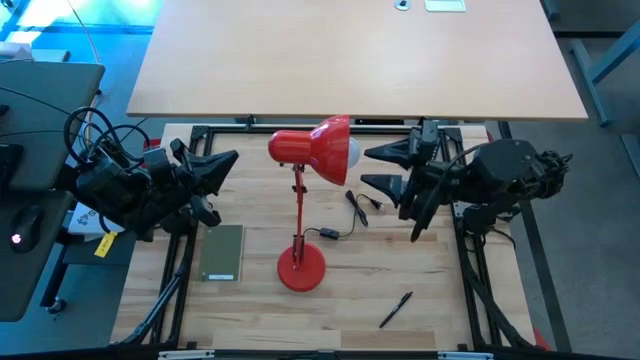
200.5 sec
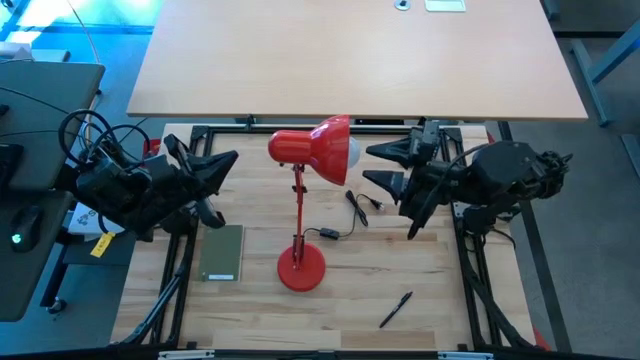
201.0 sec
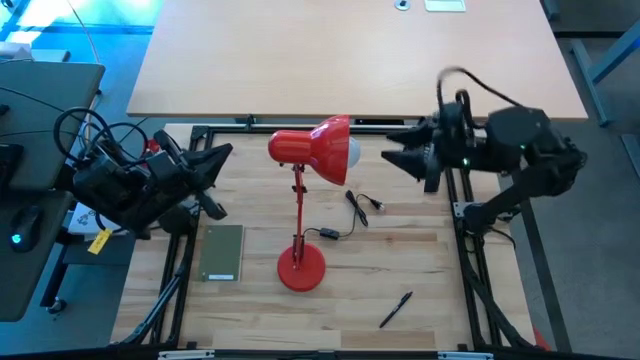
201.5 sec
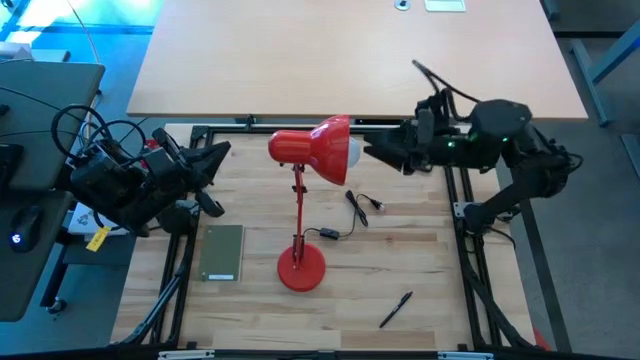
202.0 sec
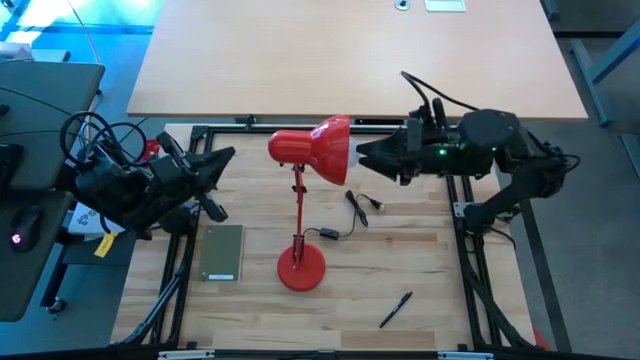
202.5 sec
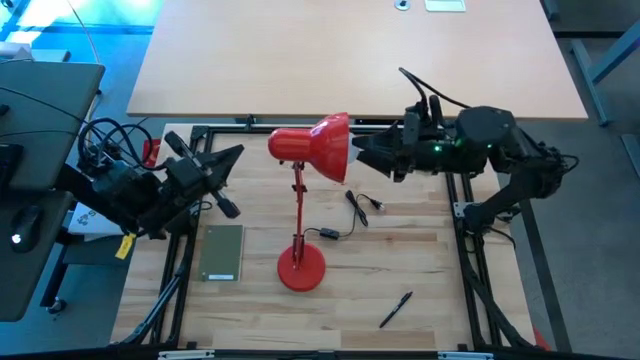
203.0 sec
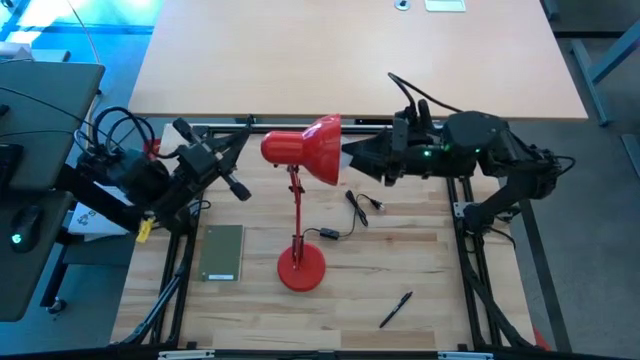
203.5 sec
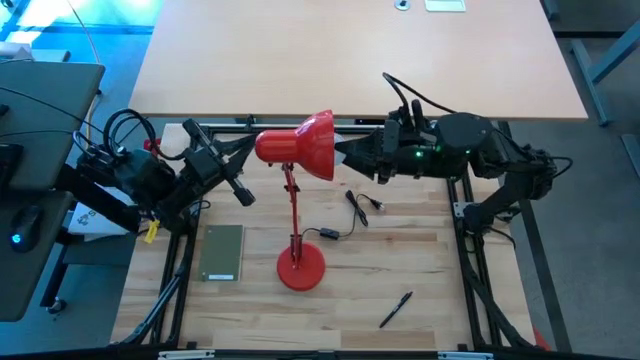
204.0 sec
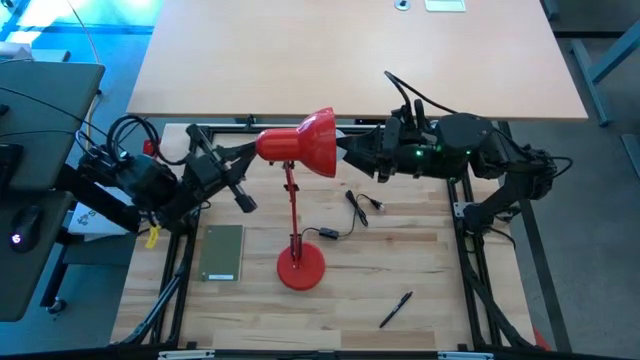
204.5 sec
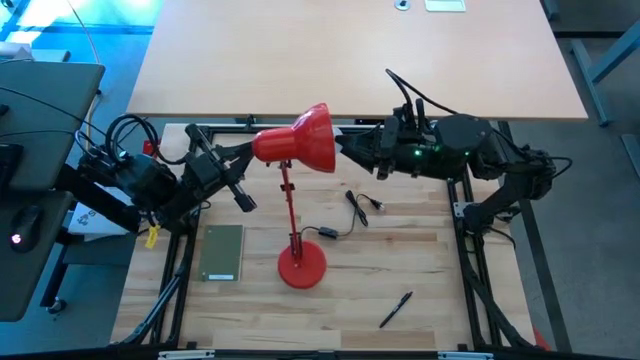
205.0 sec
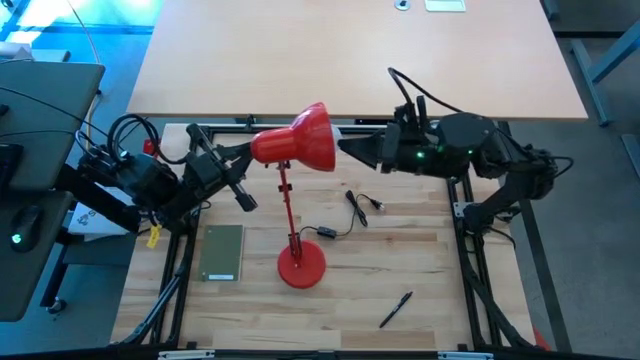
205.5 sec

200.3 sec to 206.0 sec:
Task: Screw lightbulb
Insert the white lightbulb into the red lamp

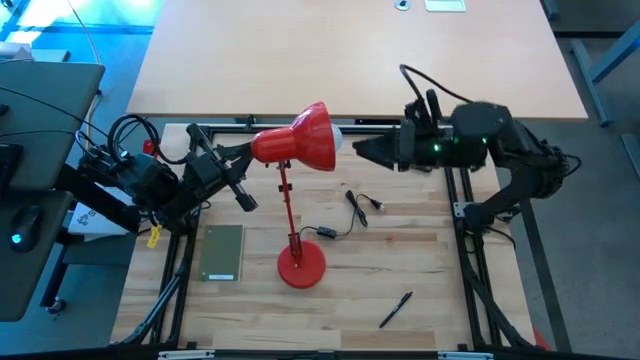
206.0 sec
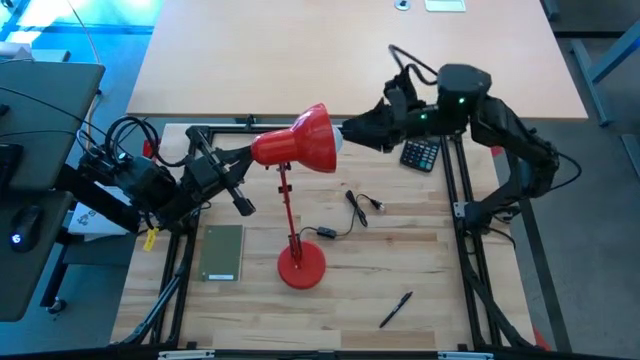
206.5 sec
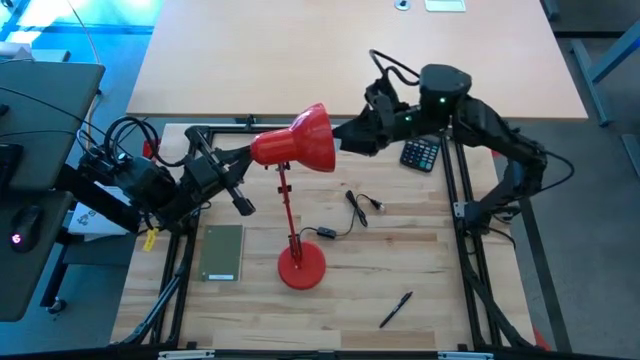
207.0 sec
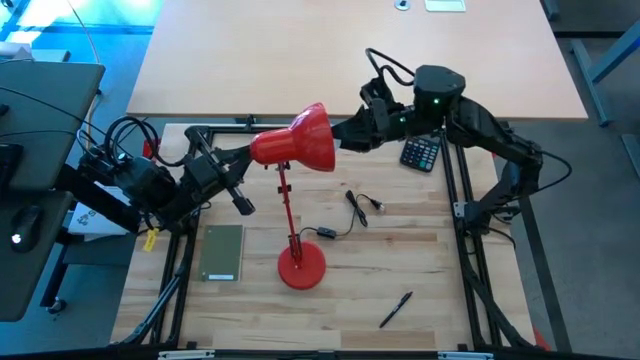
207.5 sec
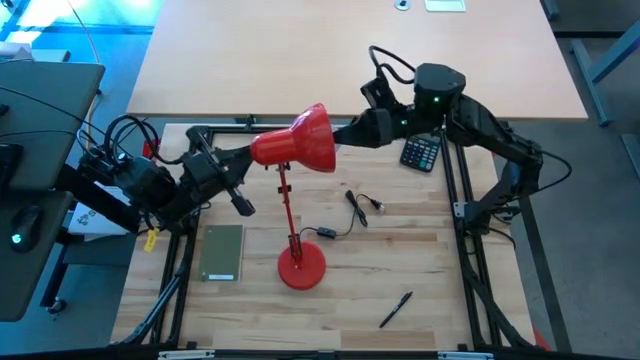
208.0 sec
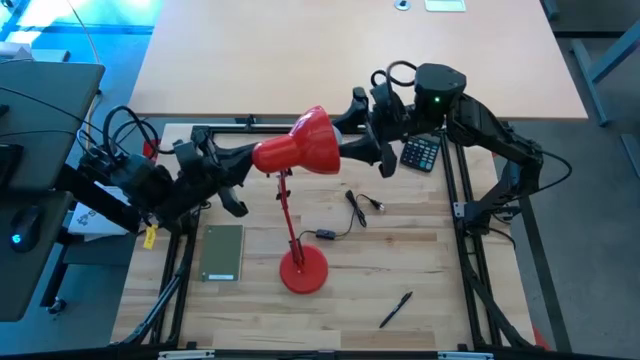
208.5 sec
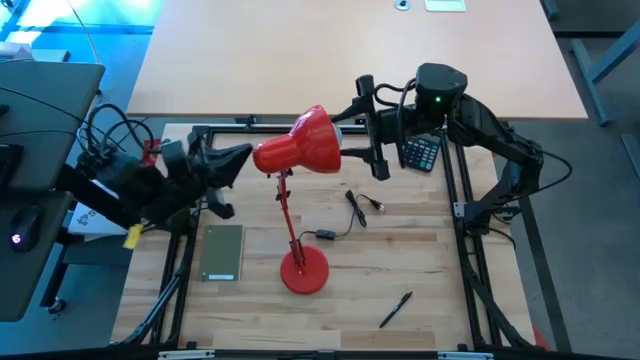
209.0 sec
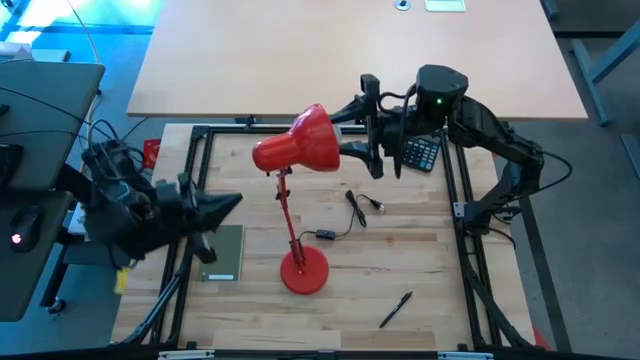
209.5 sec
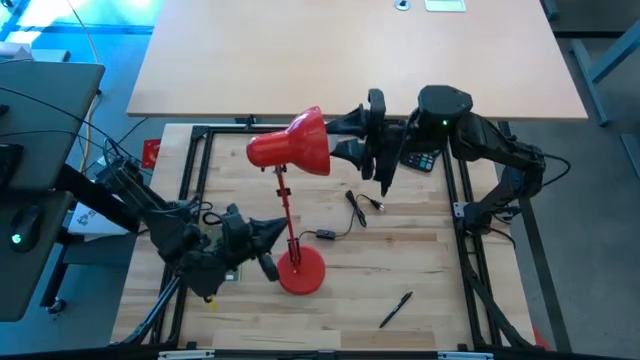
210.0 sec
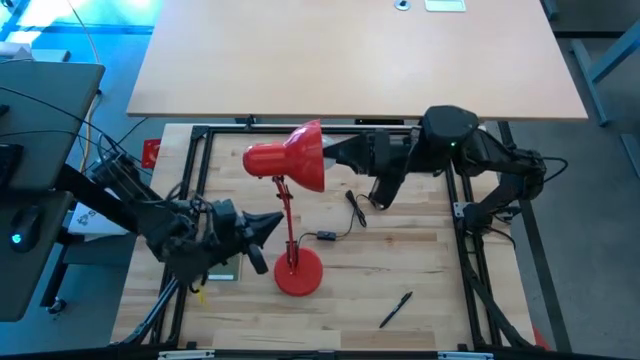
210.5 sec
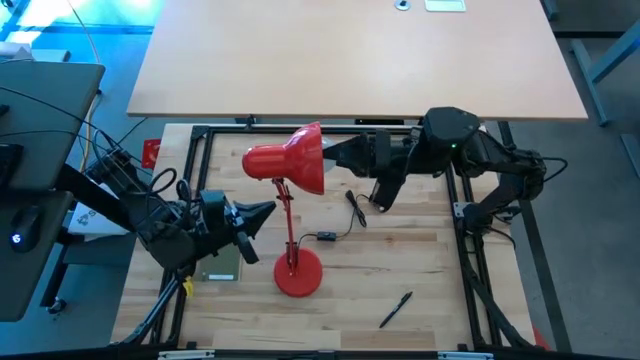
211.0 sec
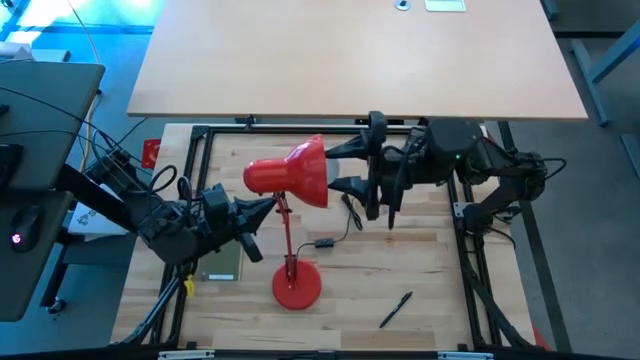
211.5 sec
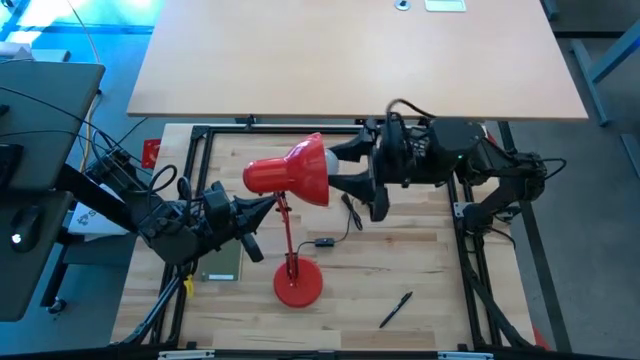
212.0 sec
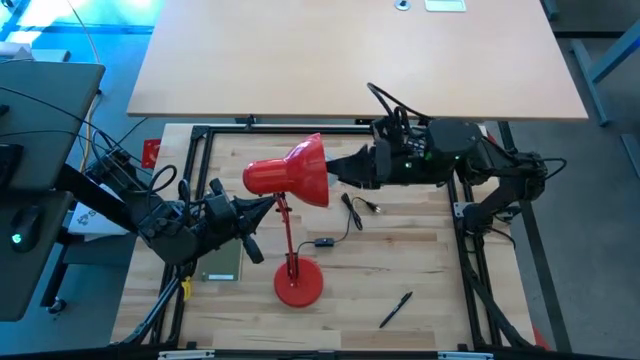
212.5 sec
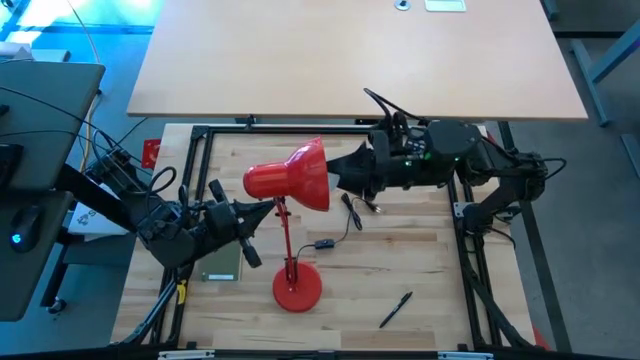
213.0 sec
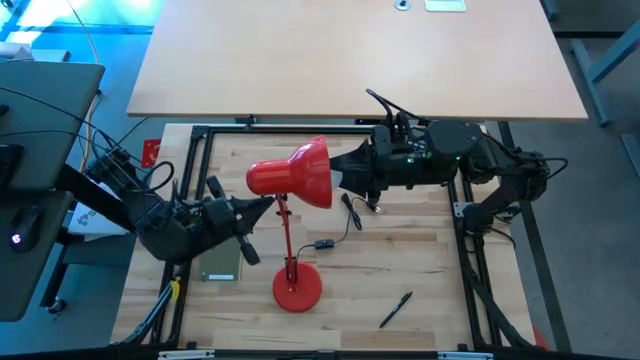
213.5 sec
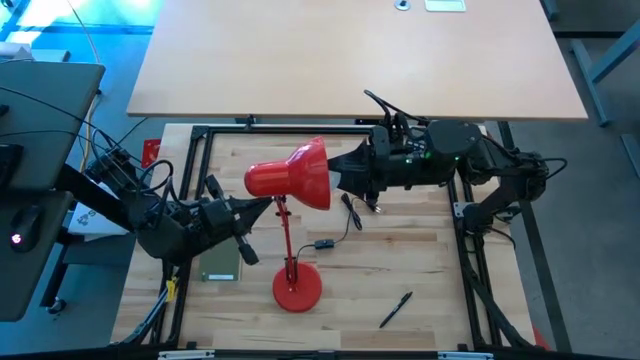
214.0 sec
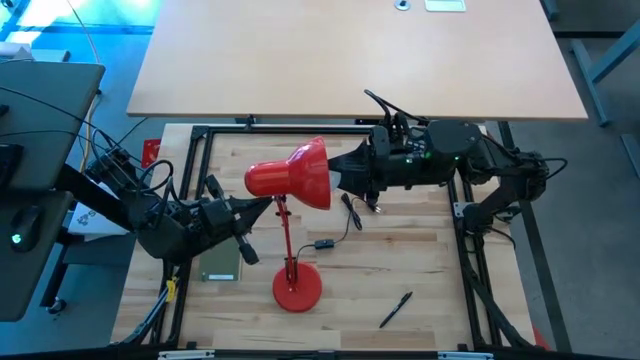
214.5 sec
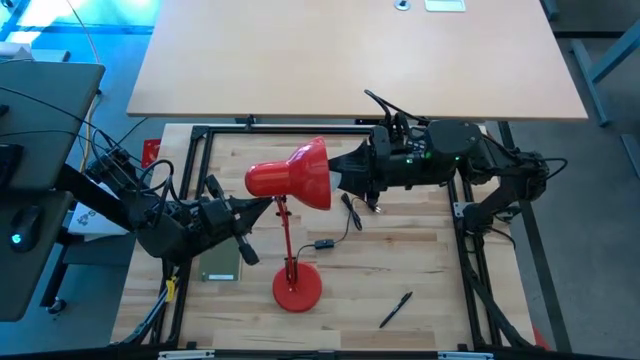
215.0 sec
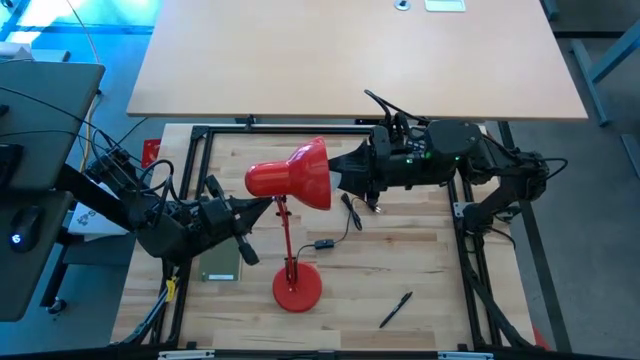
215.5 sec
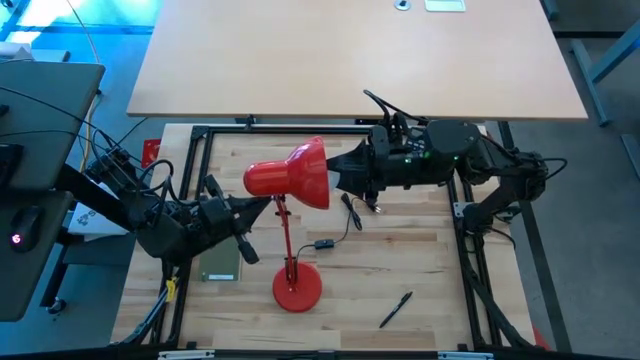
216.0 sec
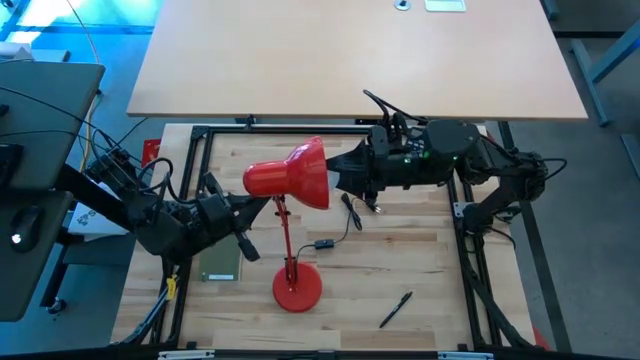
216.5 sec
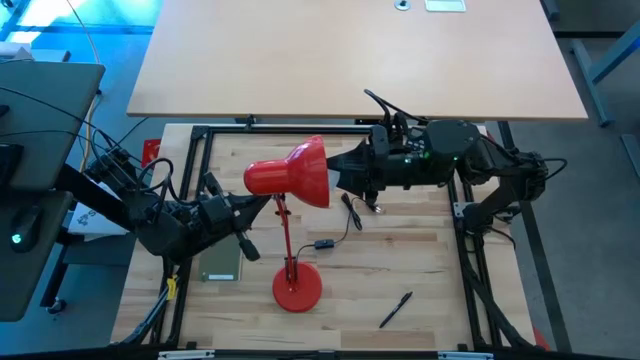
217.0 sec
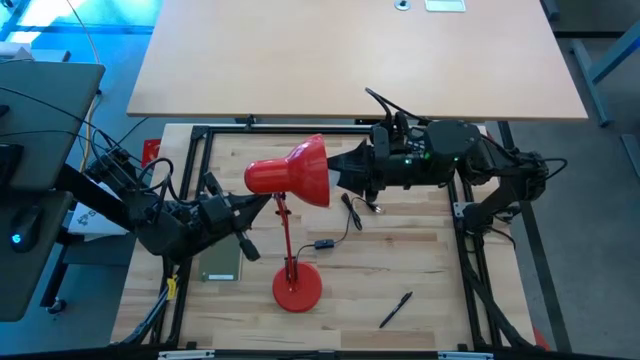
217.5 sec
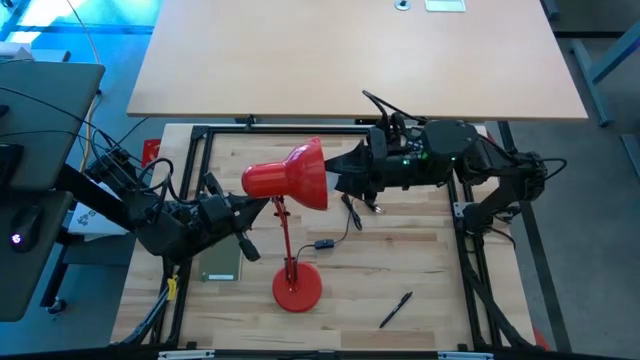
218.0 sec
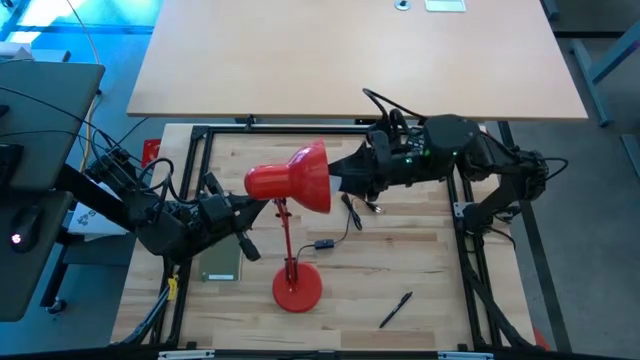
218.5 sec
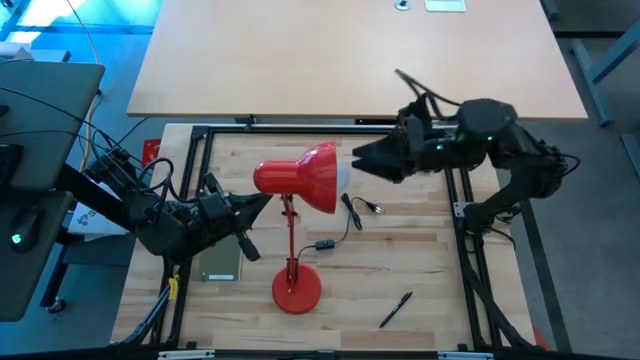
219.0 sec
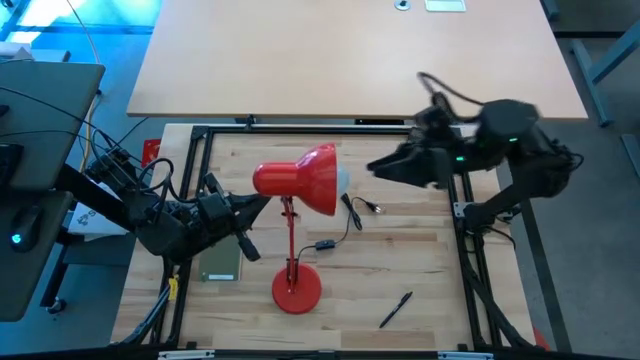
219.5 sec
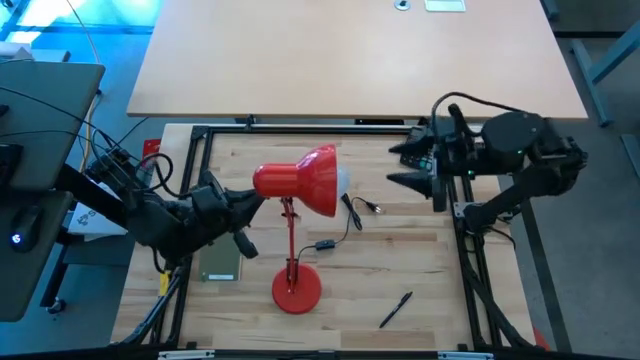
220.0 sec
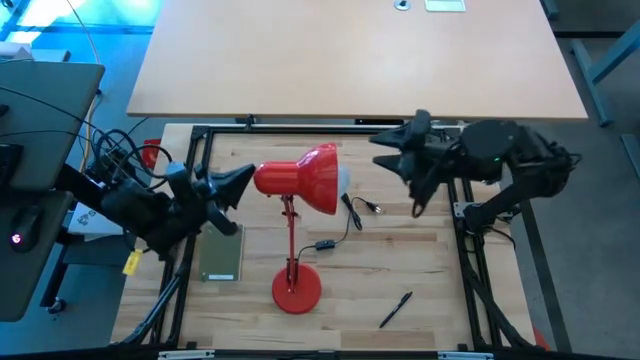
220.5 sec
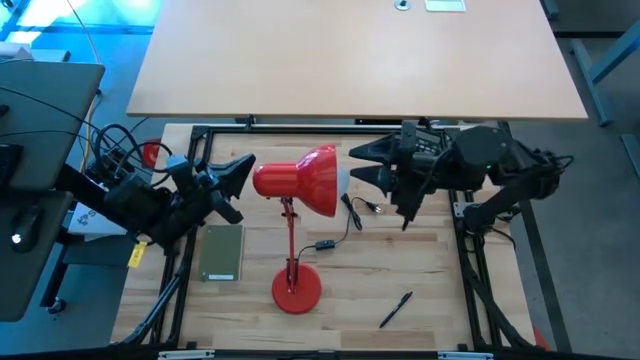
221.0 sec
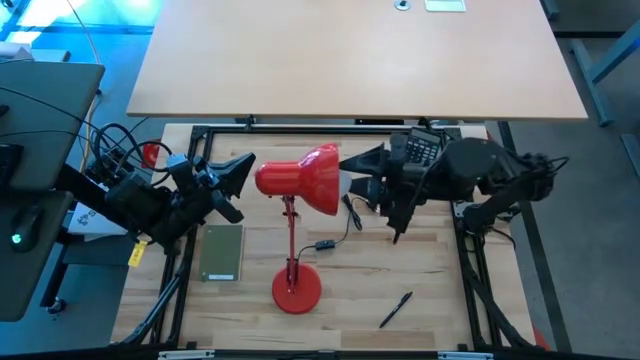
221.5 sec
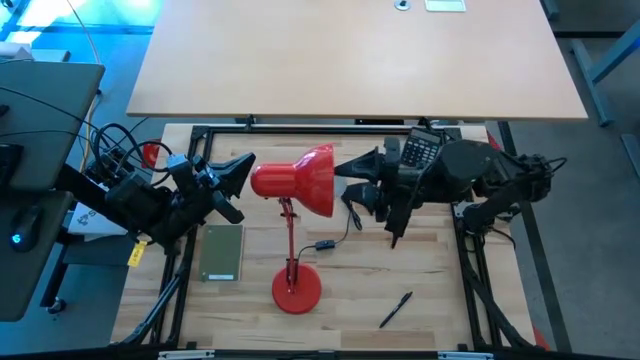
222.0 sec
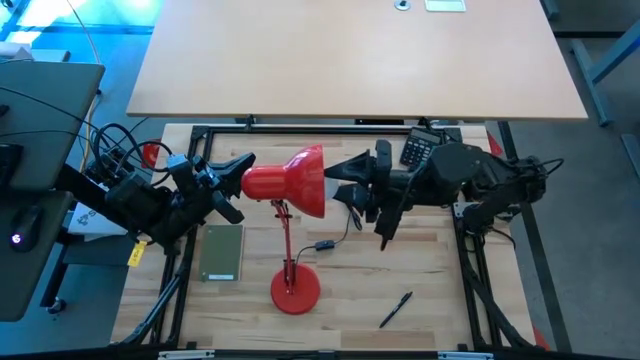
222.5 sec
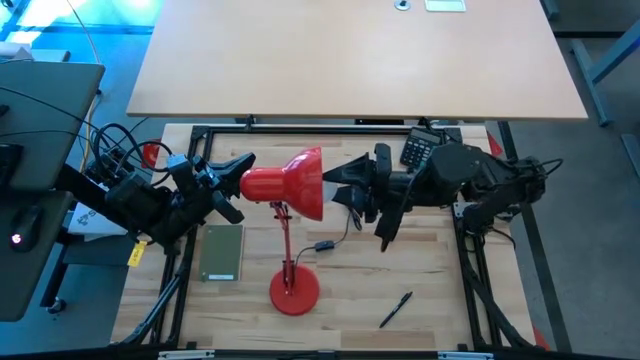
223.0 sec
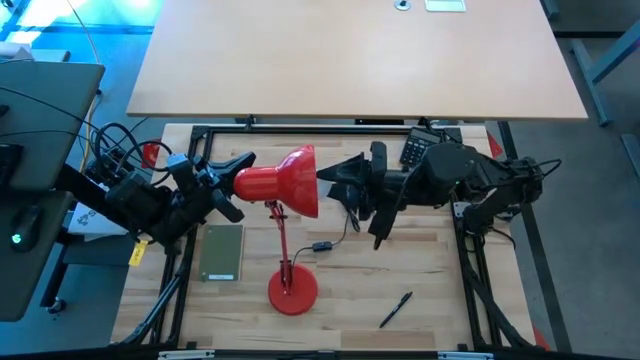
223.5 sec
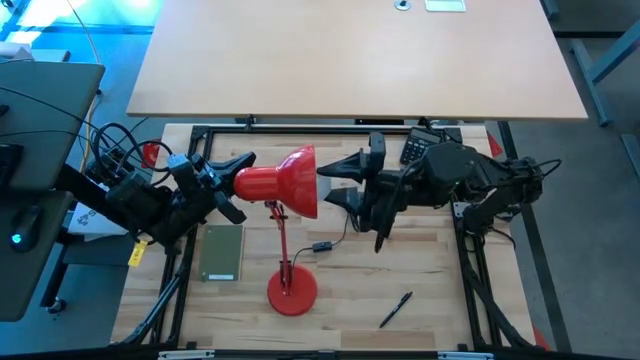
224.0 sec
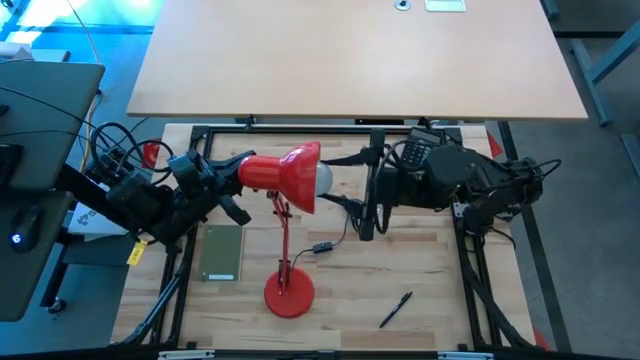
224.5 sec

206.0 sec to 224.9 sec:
Insert the white lightbulb into the red lamp
